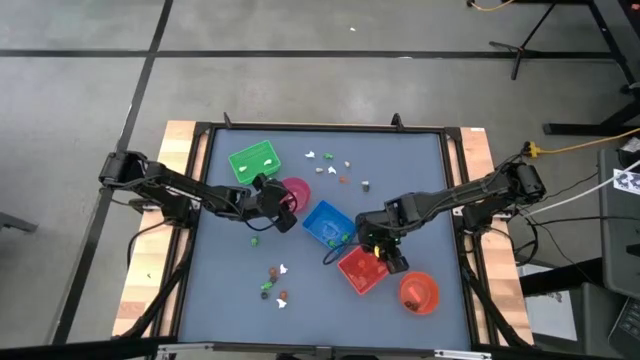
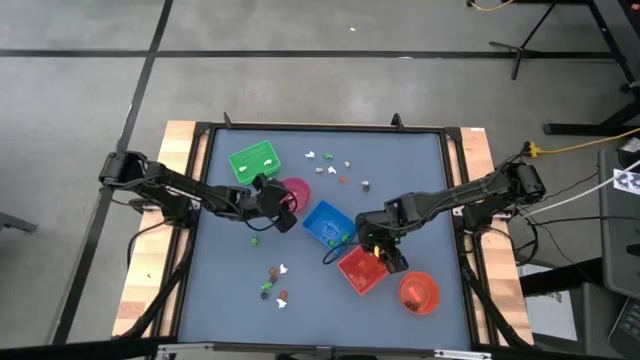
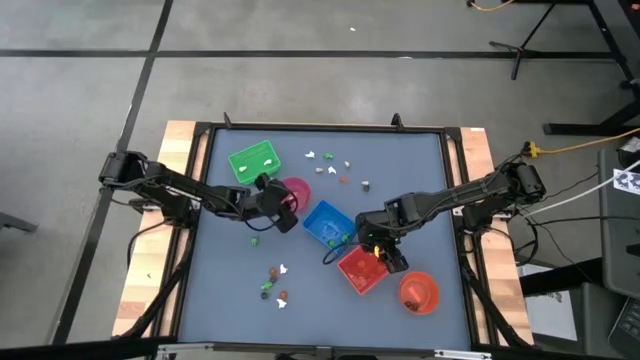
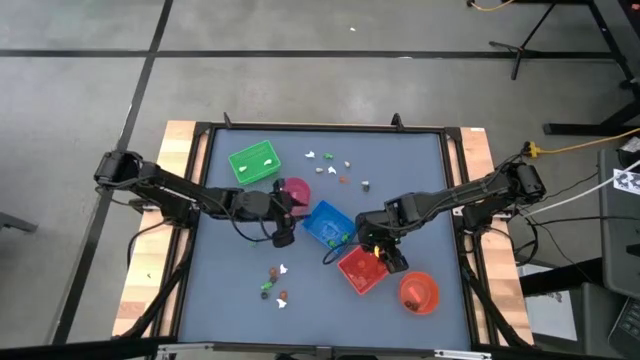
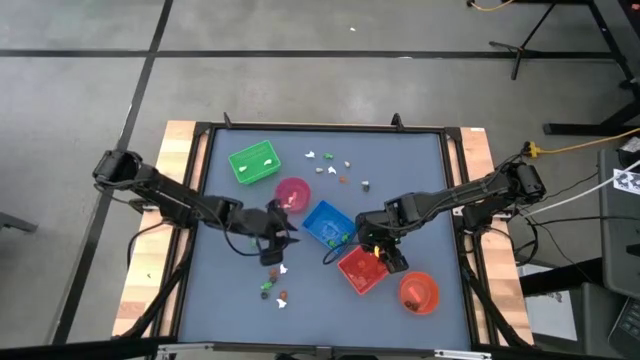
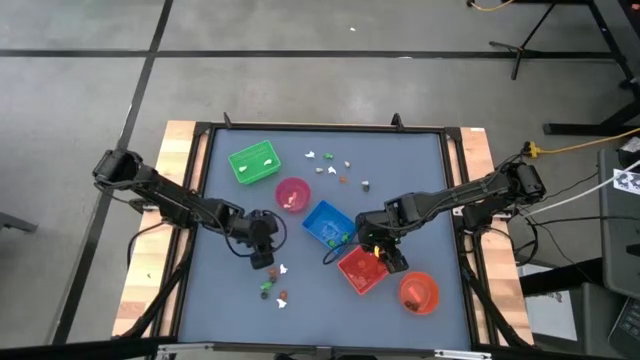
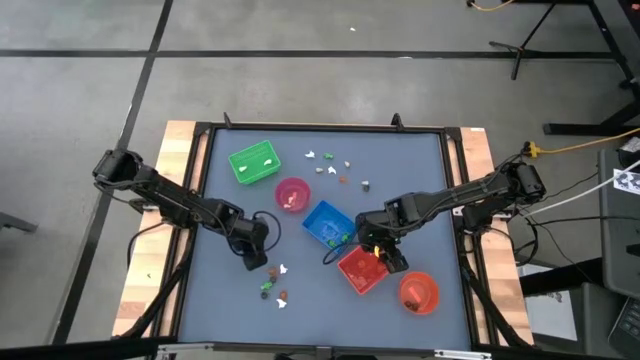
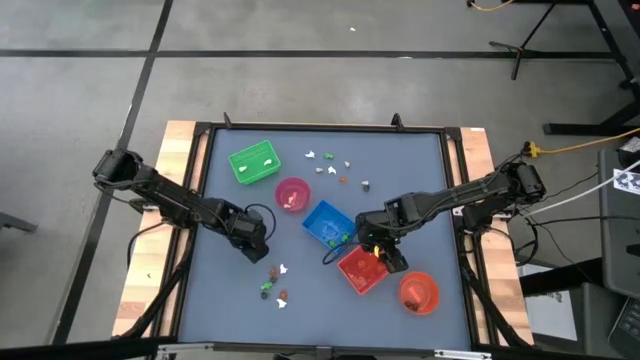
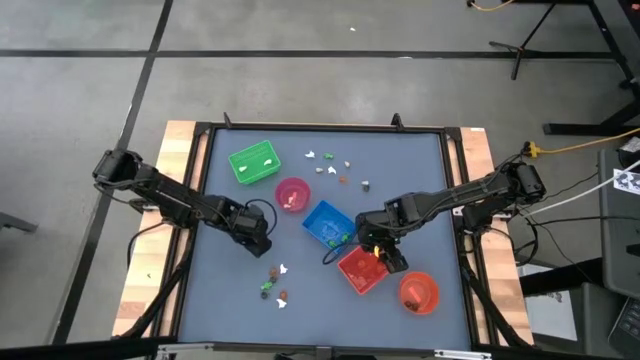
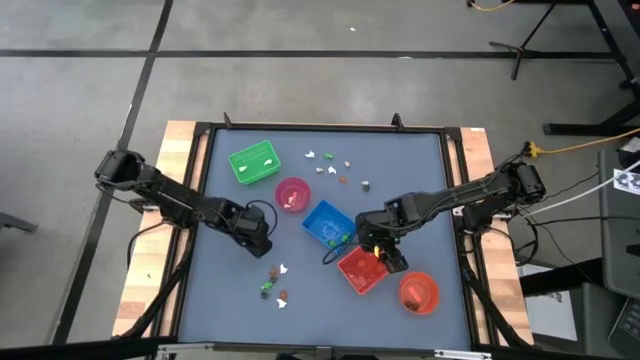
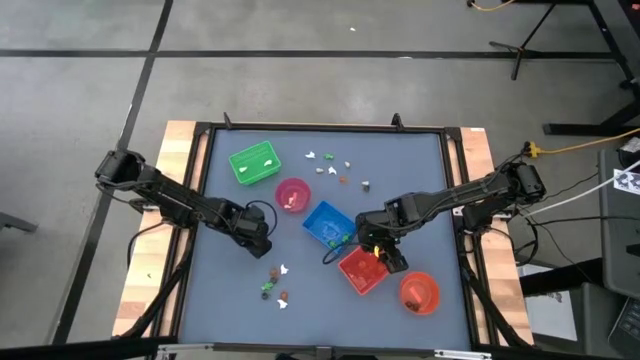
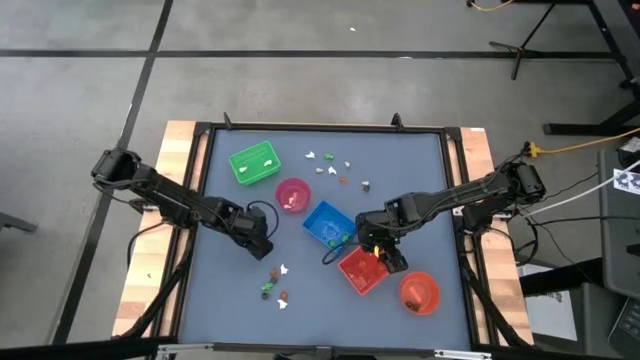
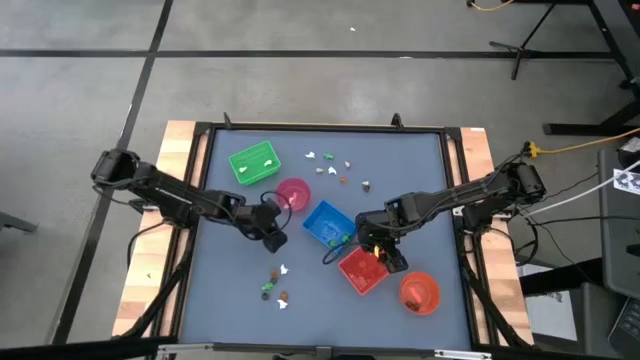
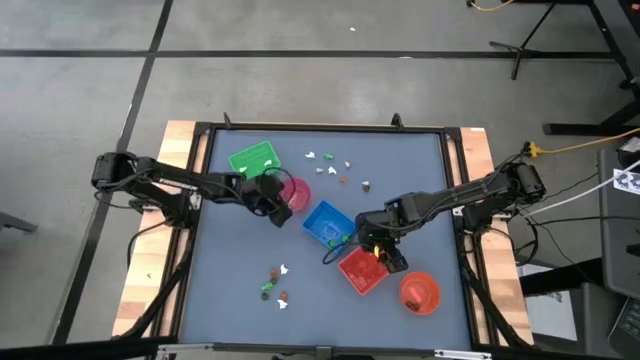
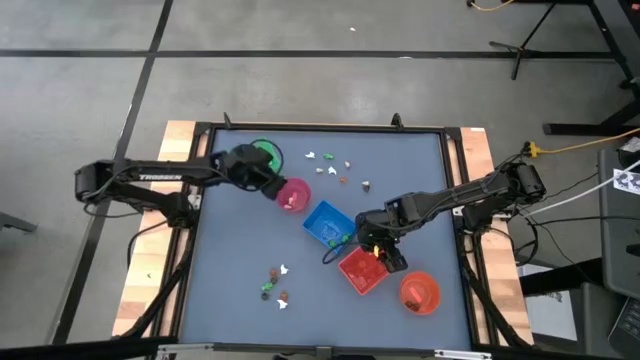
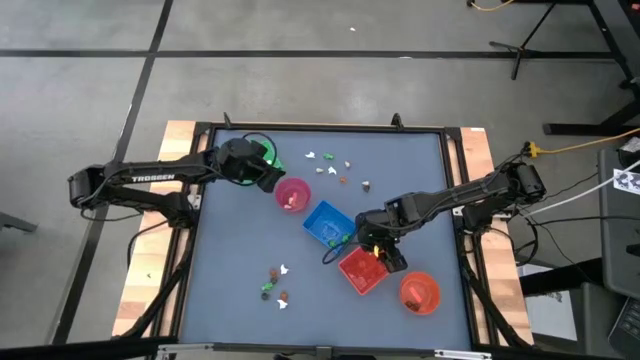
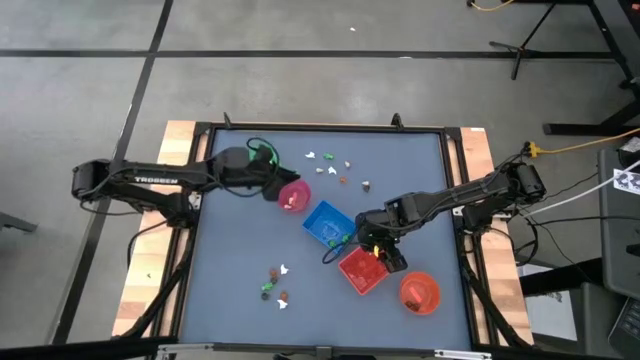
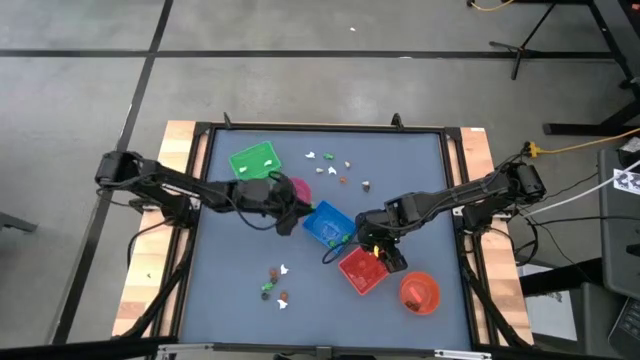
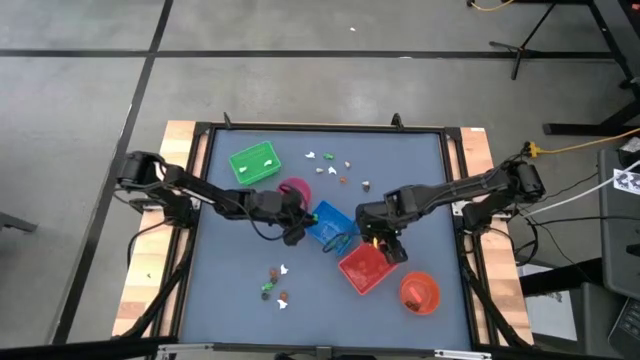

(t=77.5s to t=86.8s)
Task: Sort Halloween decoration
Put the green skeleton toy into the blue bin

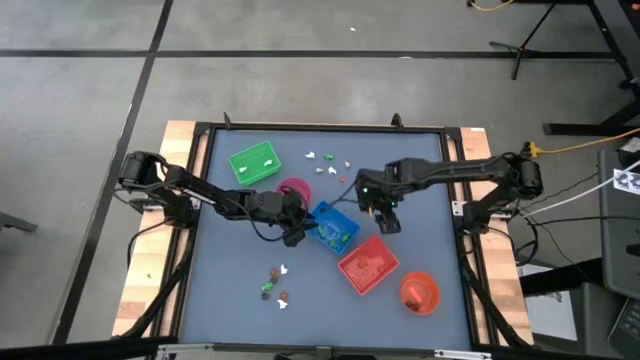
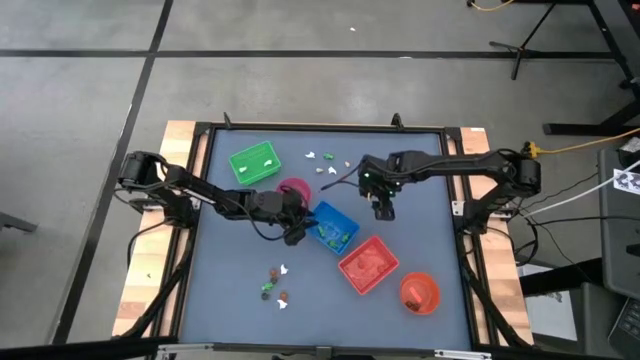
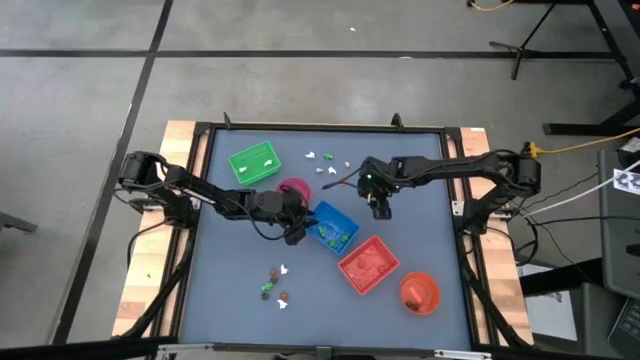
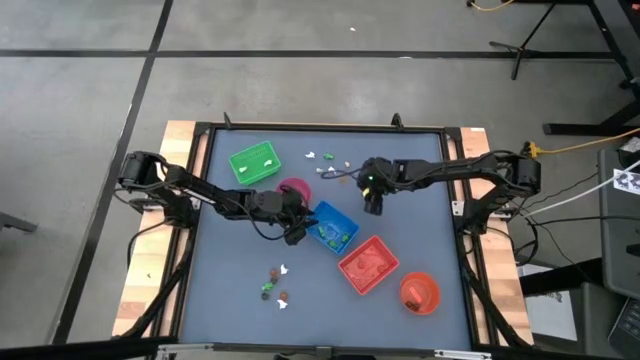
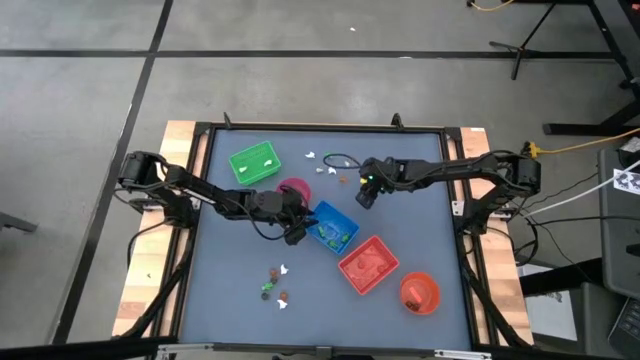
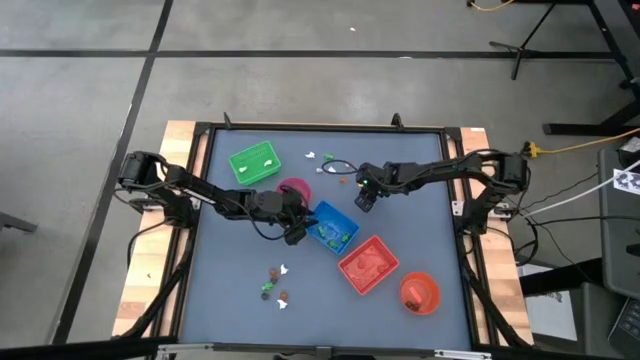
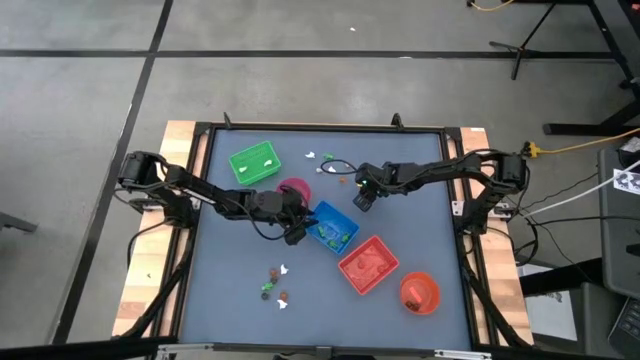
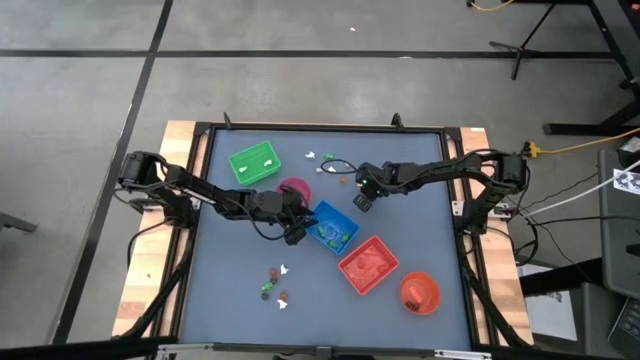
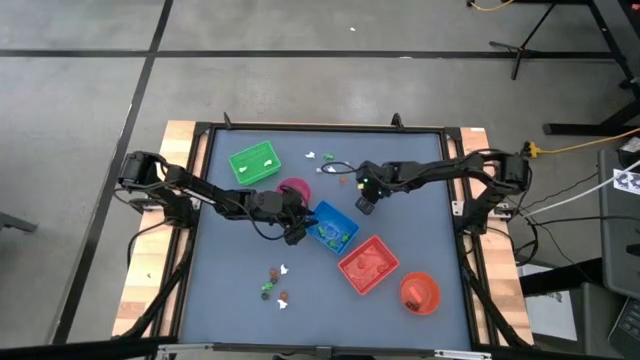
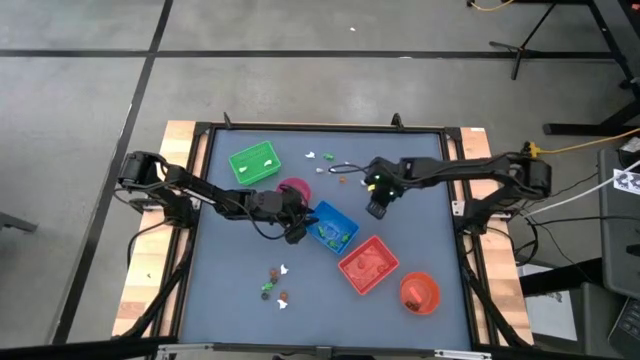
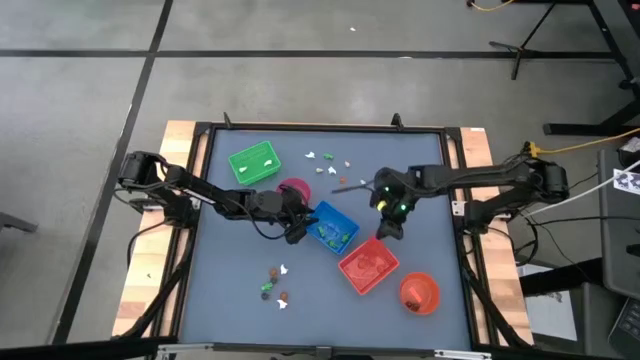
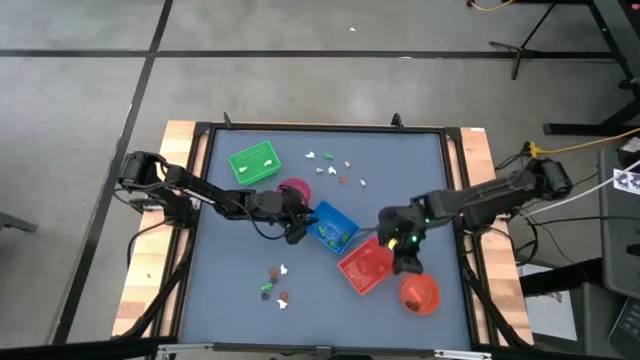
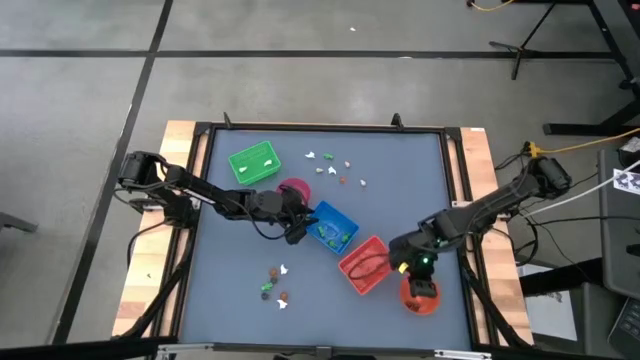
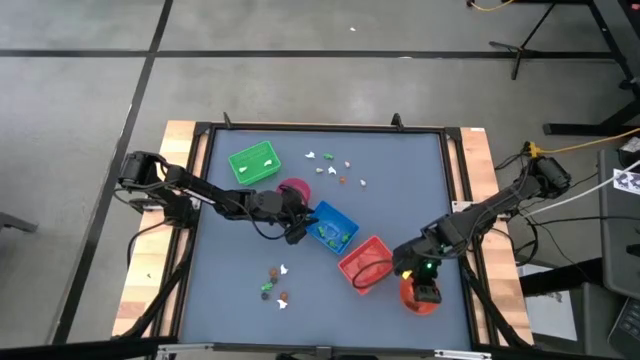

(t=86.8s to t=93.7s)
Put the black skull toy into the transparent orange bin

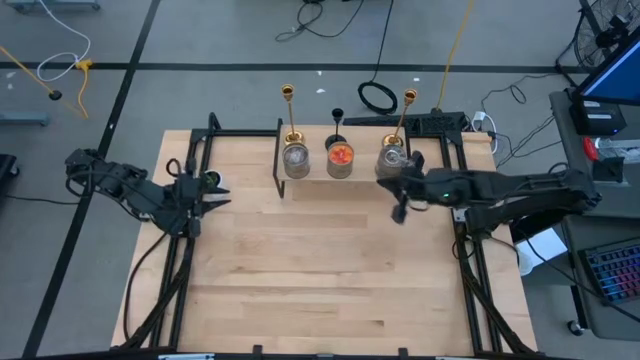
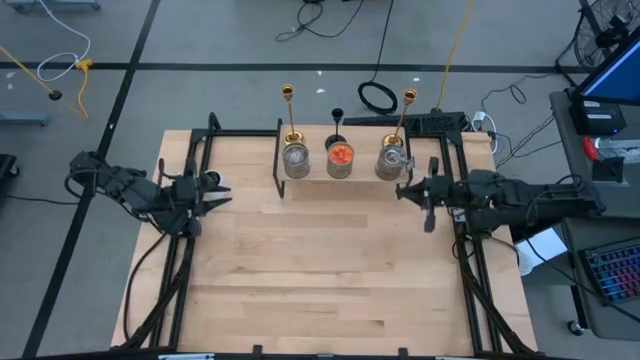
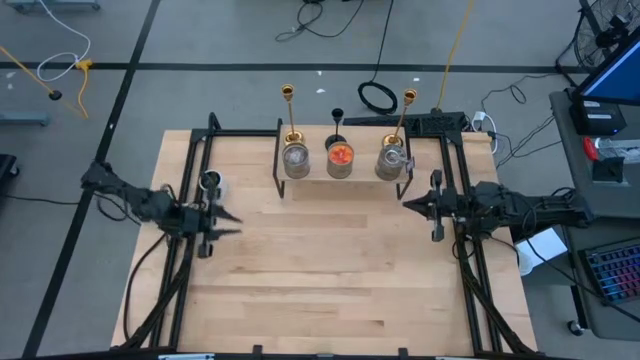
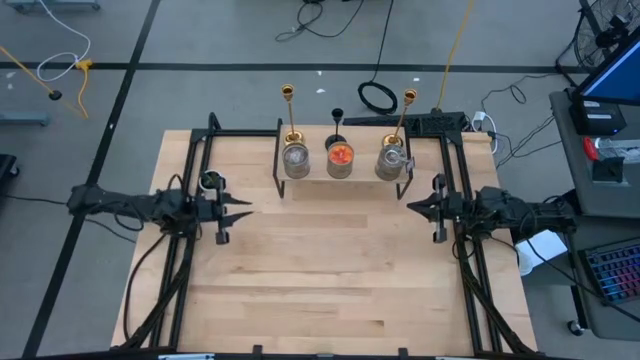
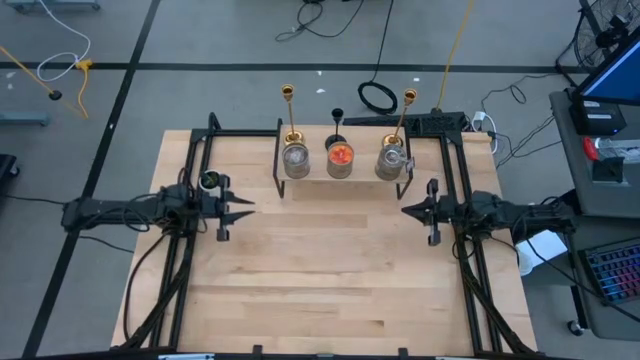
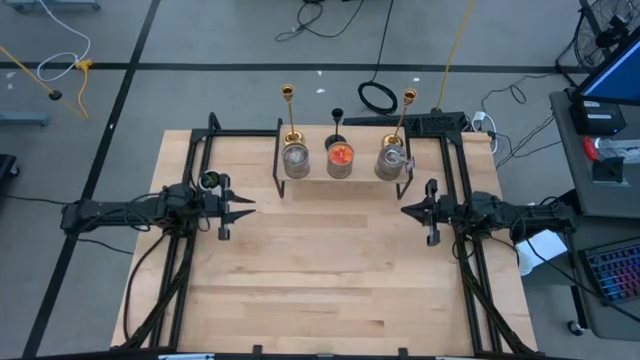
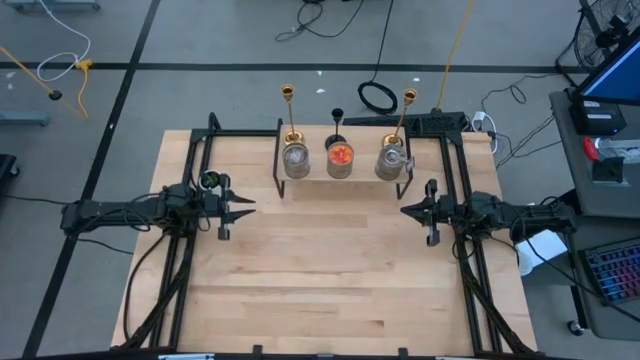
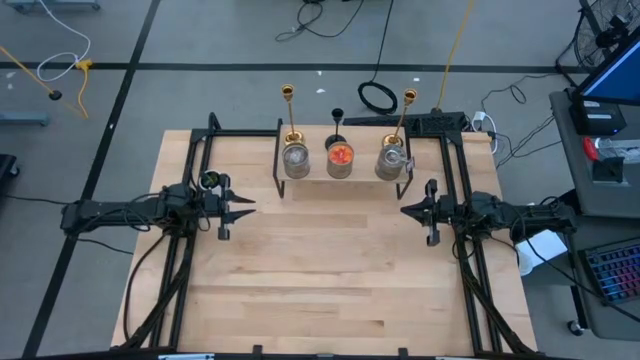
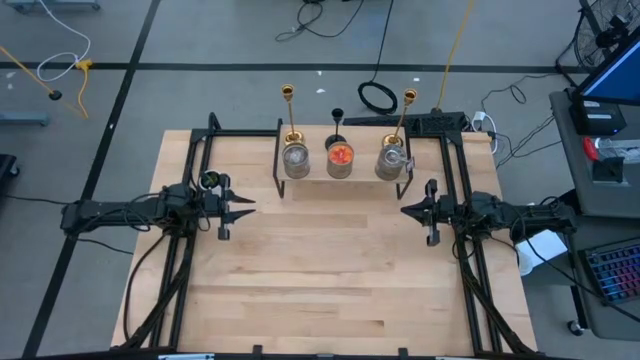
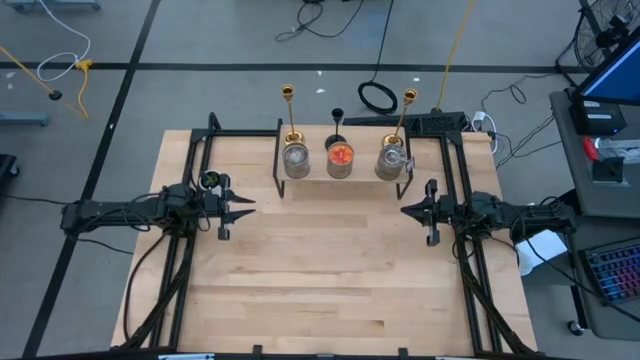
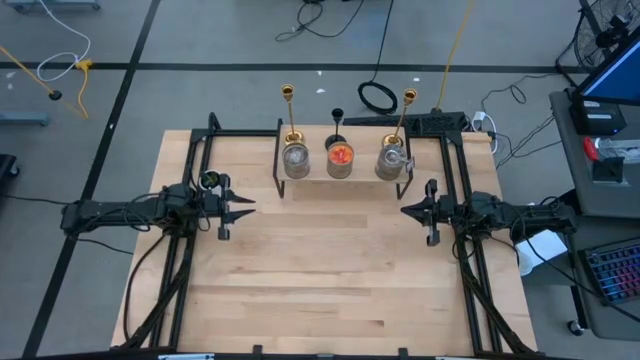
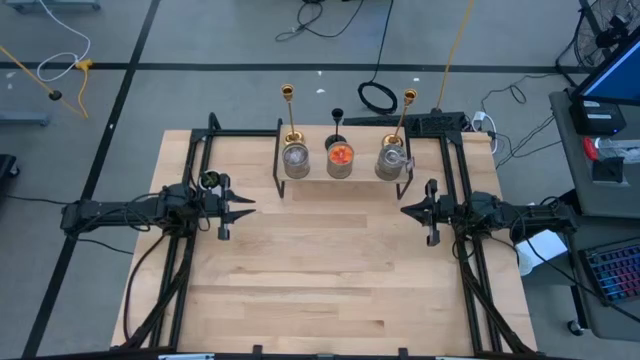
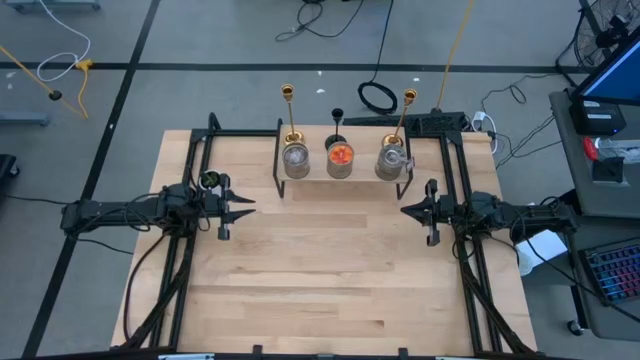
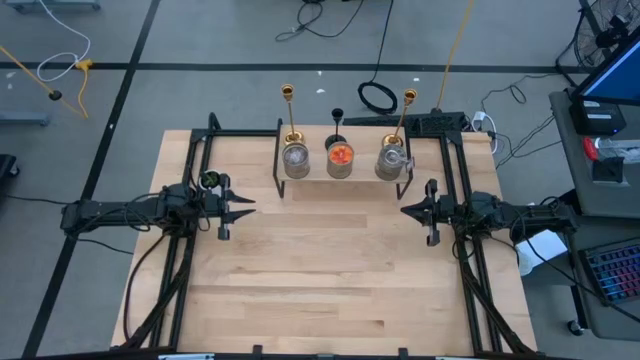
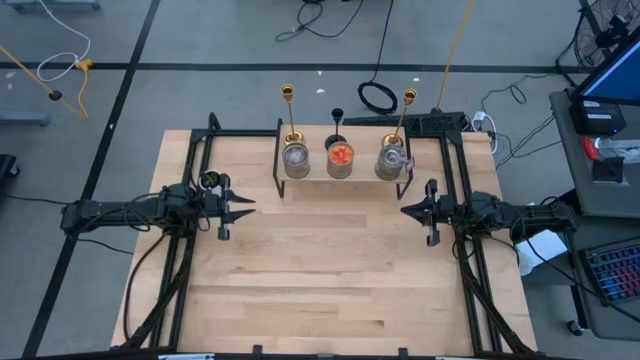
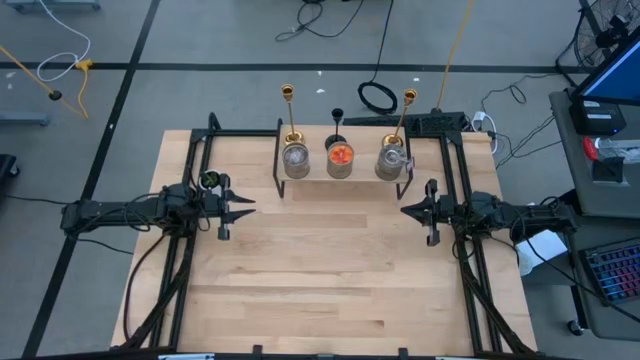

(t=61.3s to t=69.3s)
Task: Pick & Place candle stick holders
Return to Home Position
